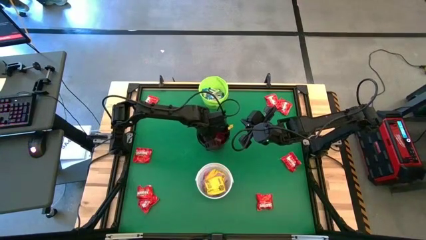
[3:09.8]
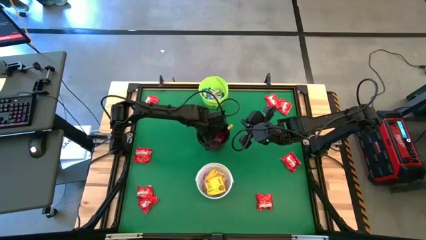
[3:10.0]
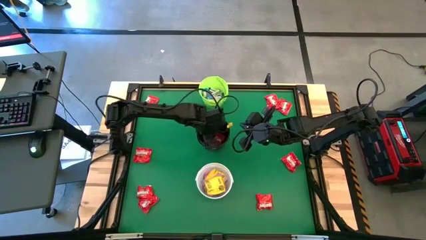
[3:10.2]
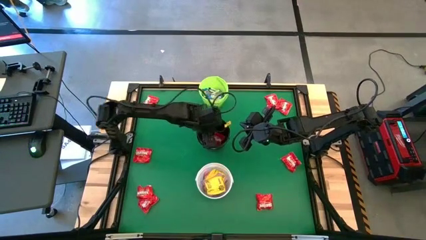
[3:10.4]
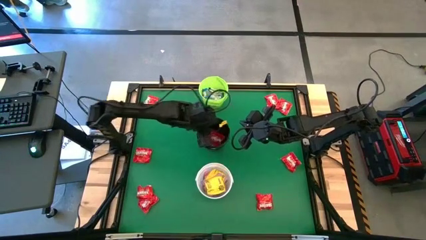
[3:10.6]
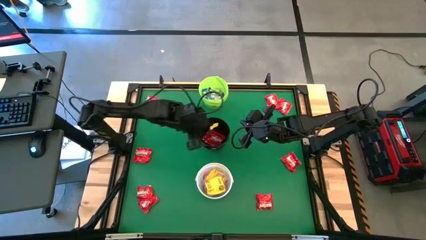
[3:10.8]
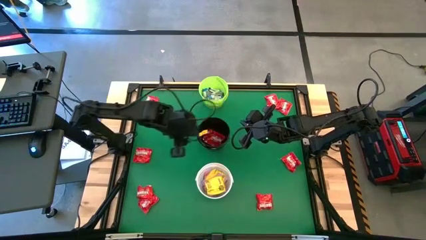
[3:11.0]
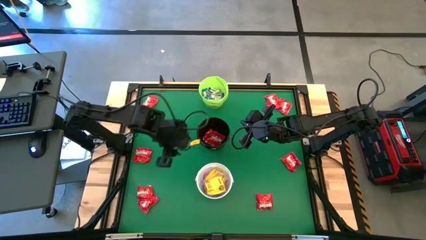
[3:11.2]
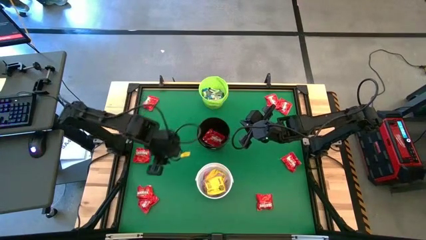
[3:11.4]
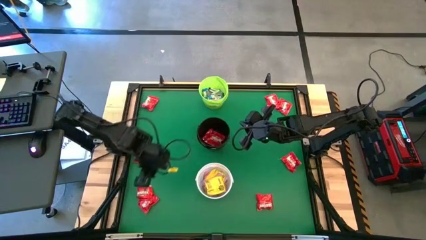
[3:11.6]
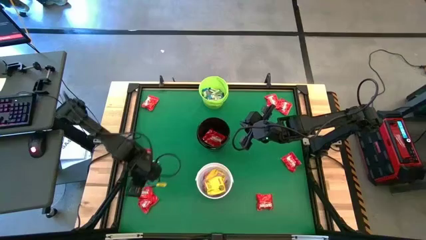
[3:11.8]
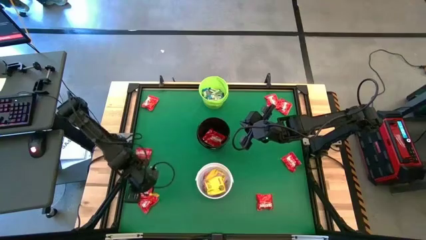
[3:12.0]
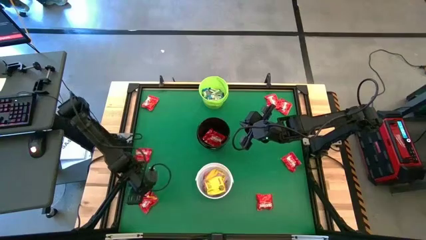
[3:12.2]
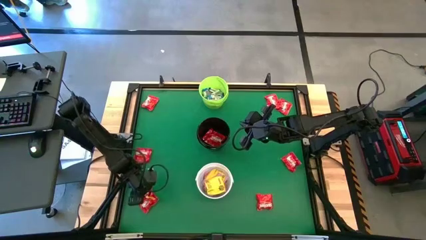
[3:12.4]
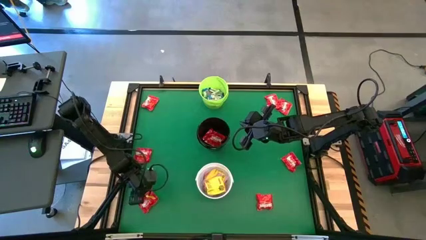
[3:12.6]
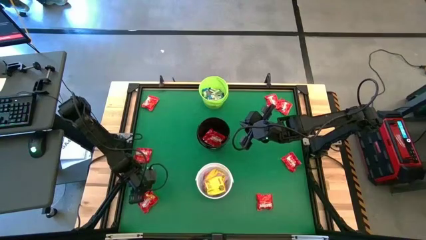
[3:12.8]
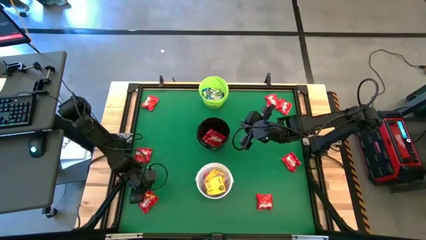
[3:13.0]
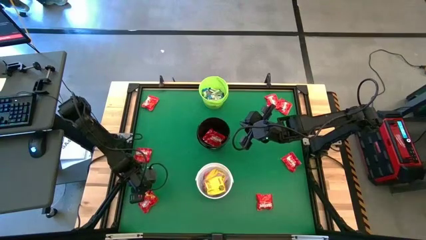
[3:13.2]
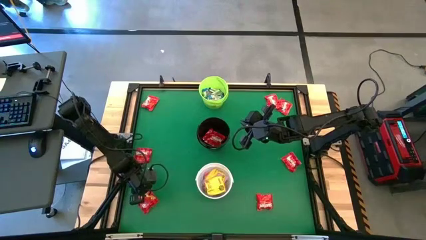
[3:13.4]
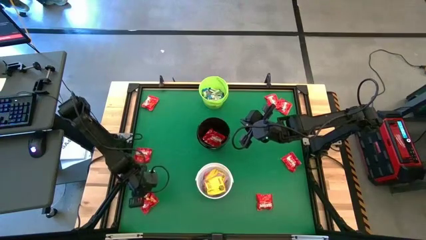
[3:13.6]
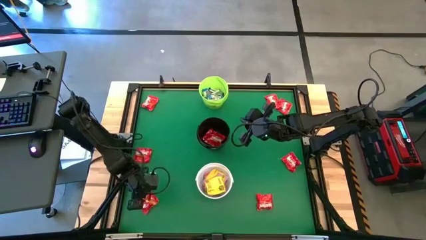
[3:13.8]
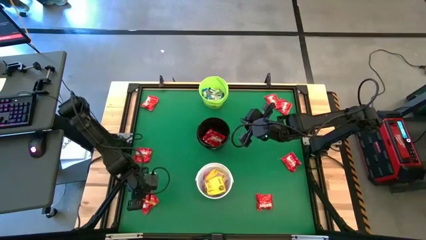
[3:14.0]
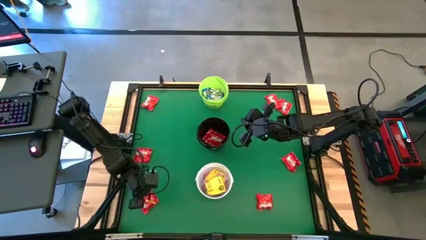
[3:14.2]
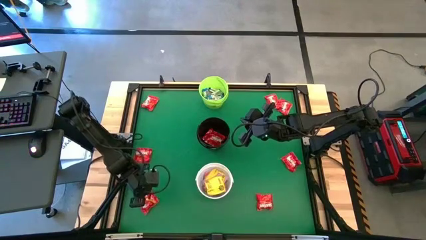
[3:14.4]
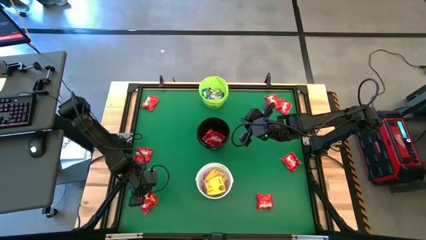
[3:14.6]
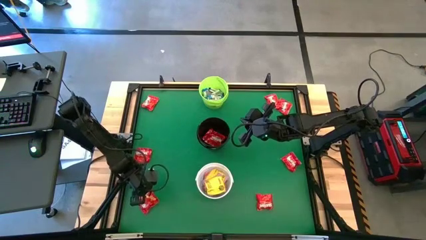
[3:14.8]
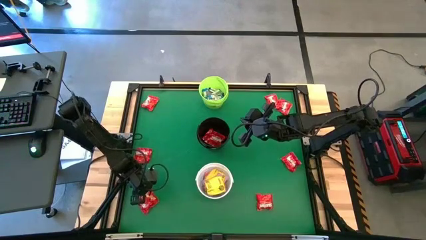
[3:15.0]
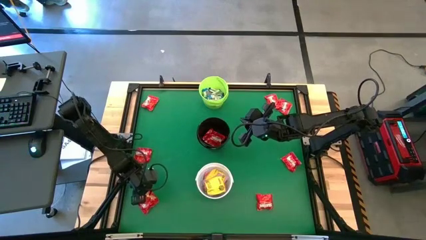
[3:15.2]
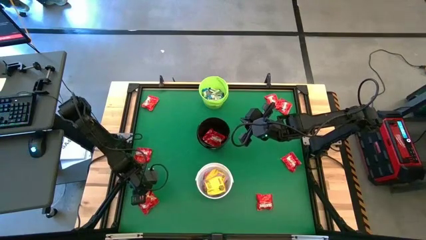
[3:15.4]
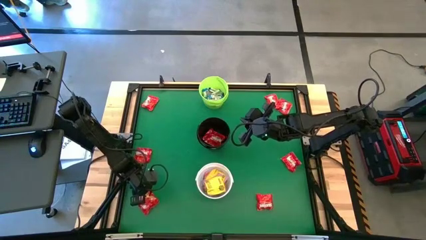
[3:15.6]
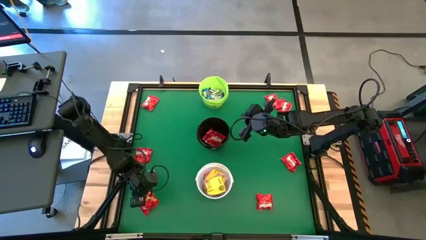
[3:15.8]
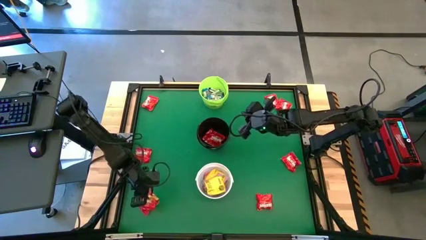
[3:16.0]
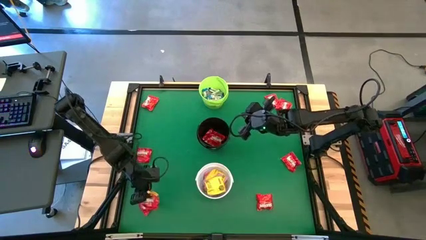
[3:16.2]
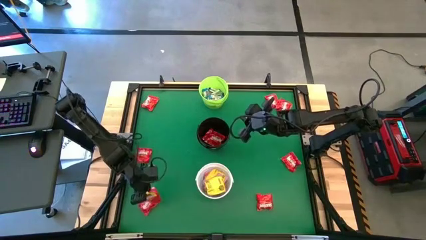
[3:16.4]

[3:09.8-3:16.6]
Task: Sort candy by brand, put in halloween buckets
Put the red chocolate into the black bucket

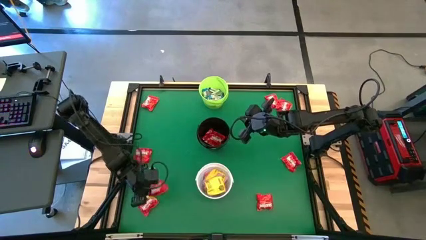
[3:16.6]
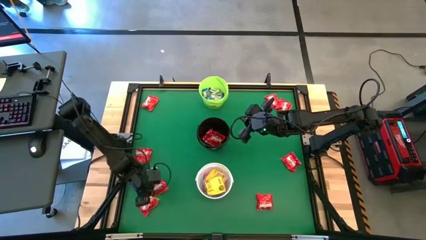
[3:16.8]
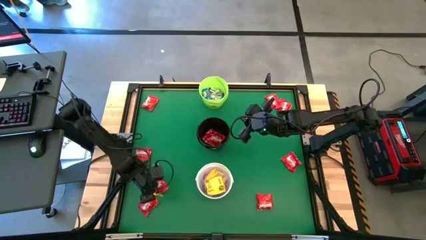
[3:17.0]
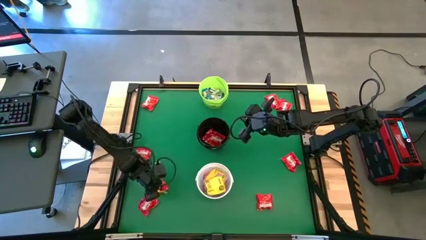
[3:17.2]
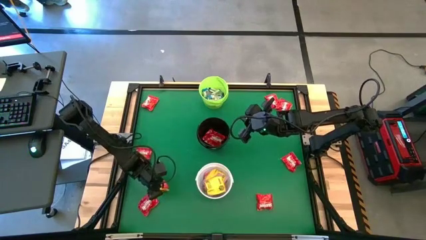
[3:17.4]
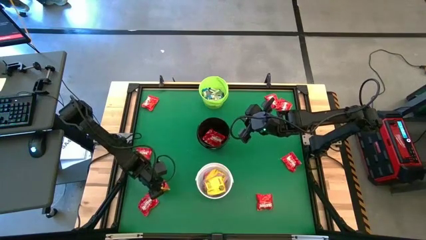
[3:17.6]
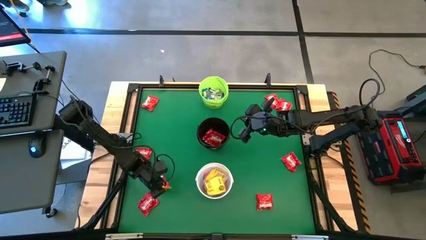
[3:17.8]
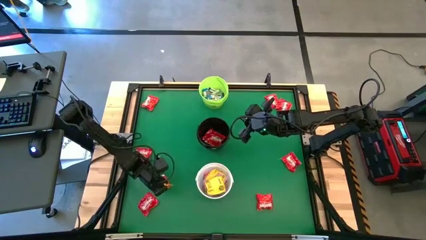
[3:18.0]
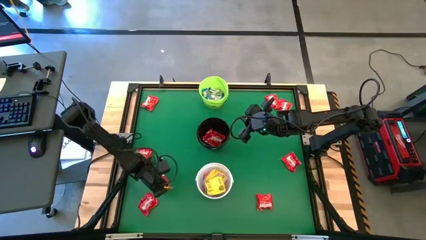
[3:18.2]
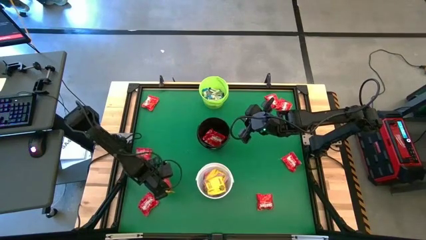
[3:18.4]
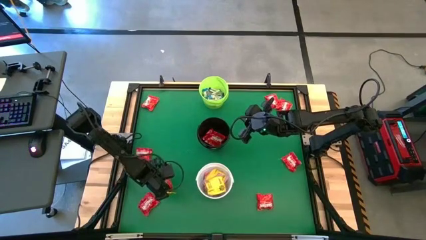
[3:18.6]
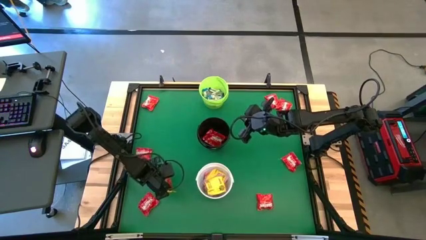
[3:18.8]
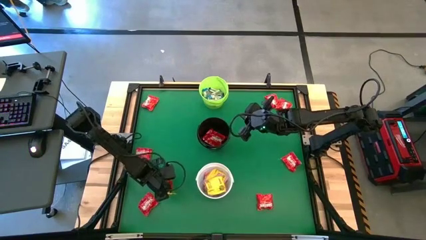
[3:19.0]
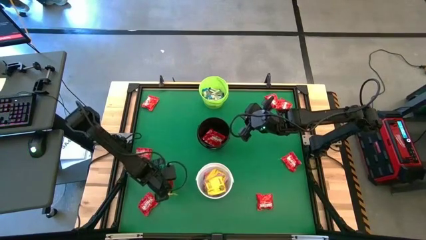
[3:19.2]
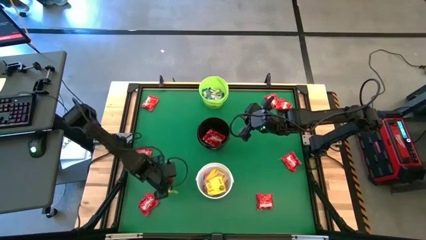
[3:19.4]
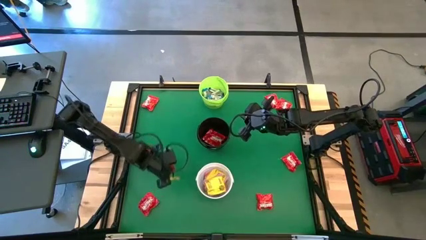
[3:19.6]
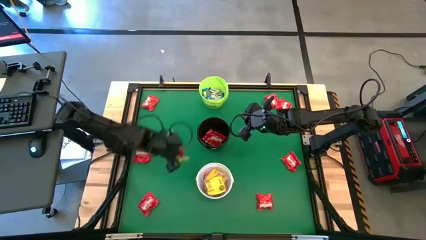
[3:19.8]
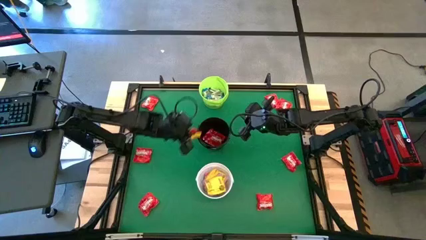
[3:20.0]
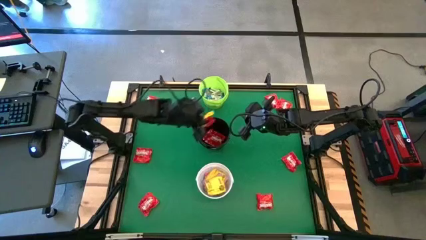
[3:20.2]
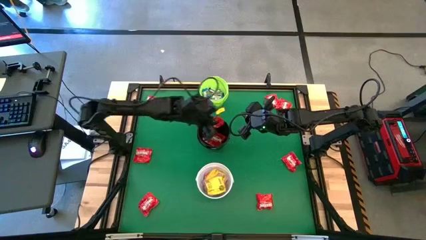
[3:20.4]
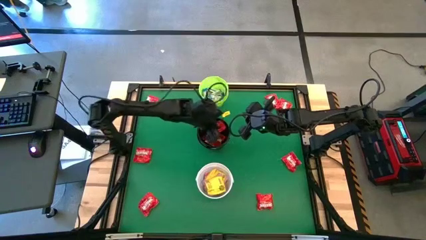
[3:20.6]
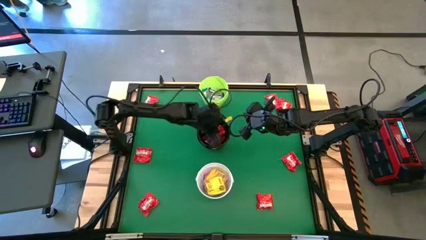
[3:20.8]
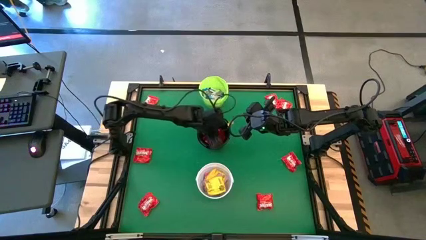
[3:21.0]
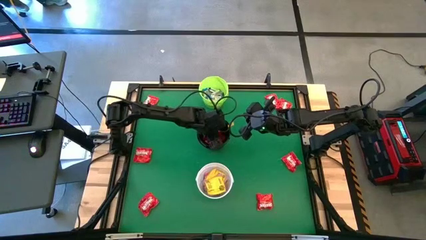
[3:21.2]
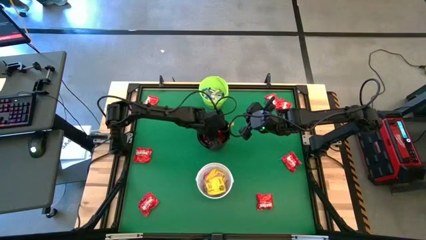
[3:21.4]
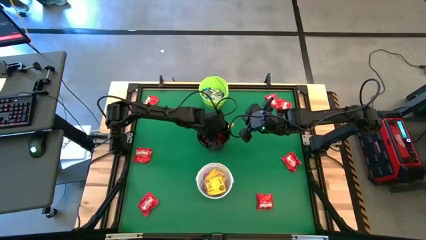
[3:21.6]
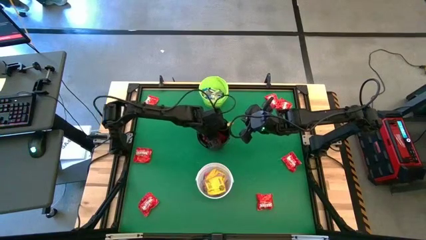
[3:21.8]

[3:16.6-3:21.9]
Put the red chocolate into the black bucket

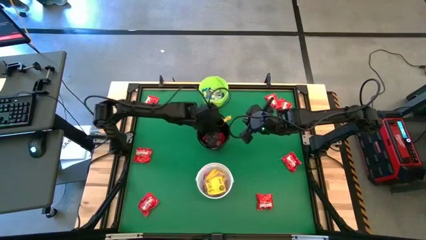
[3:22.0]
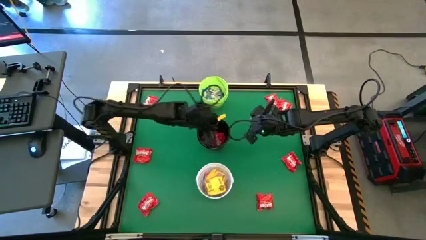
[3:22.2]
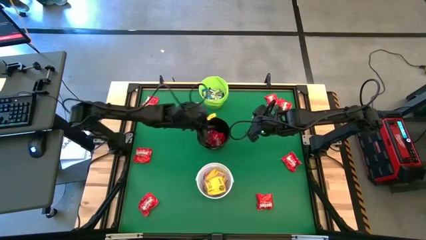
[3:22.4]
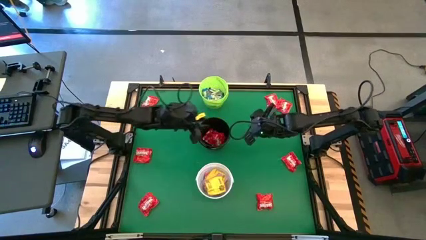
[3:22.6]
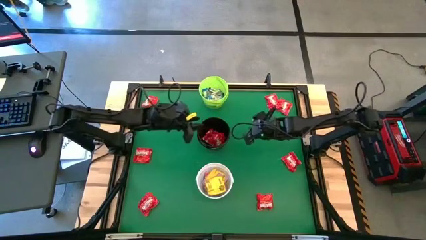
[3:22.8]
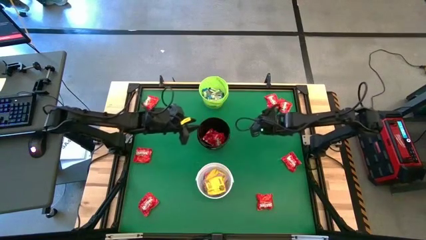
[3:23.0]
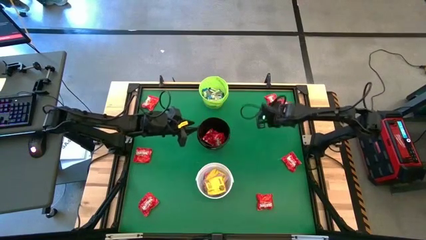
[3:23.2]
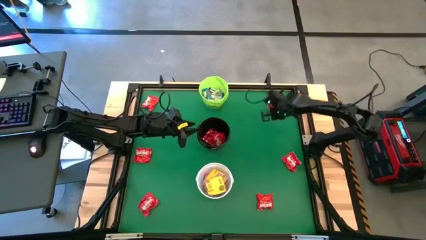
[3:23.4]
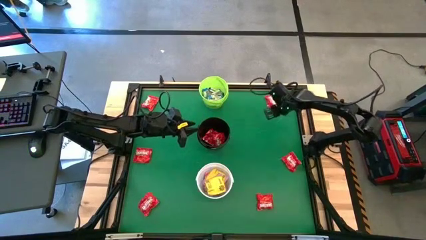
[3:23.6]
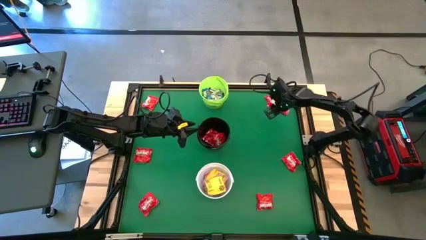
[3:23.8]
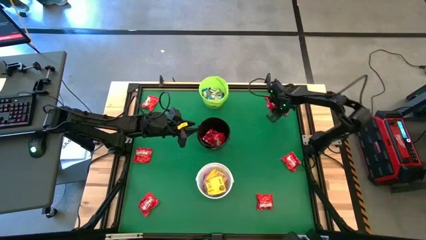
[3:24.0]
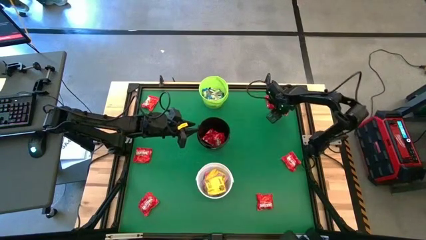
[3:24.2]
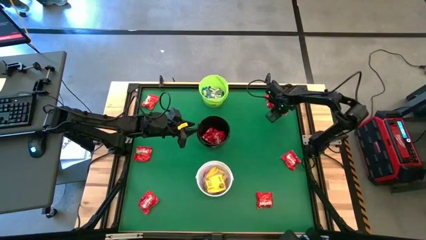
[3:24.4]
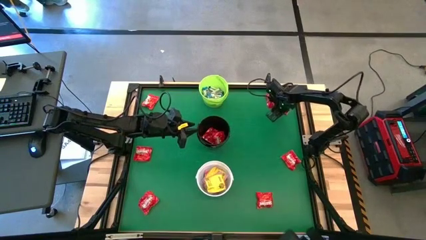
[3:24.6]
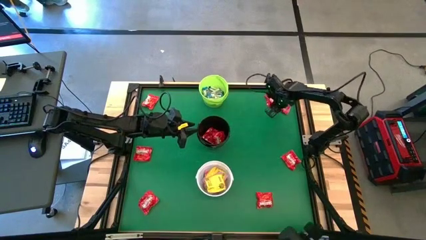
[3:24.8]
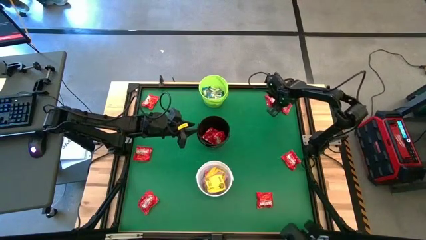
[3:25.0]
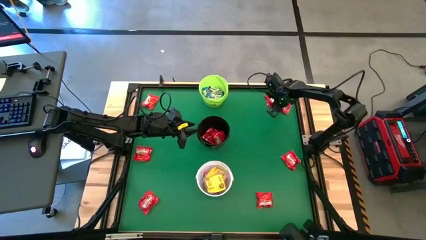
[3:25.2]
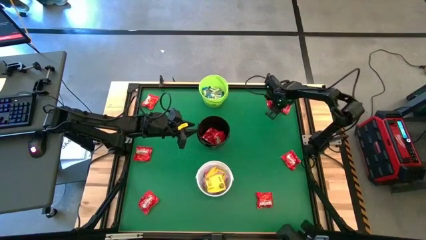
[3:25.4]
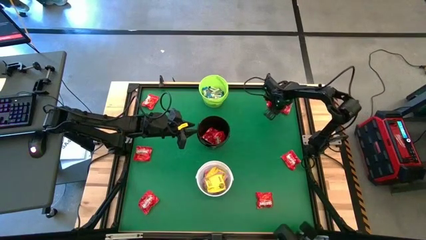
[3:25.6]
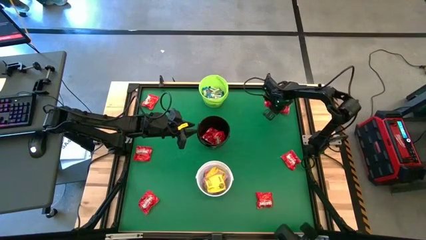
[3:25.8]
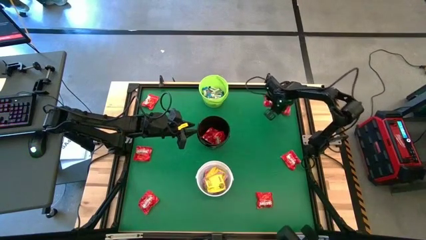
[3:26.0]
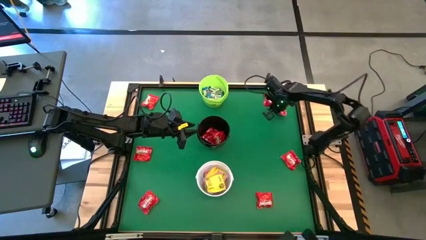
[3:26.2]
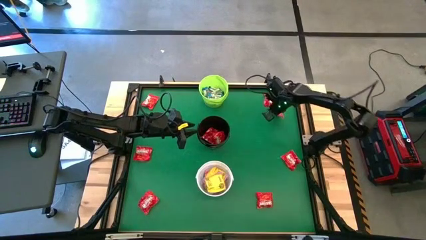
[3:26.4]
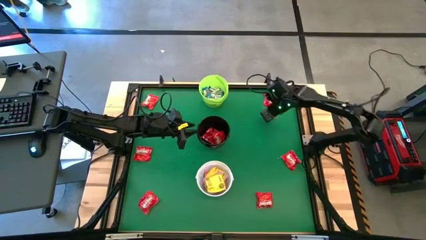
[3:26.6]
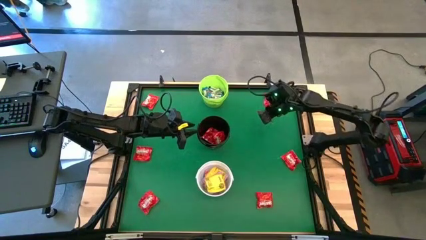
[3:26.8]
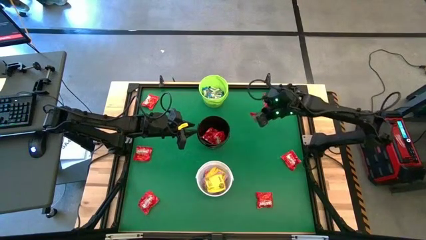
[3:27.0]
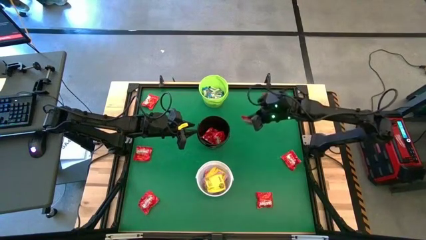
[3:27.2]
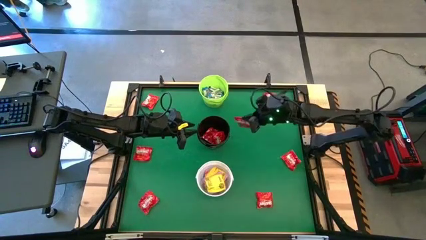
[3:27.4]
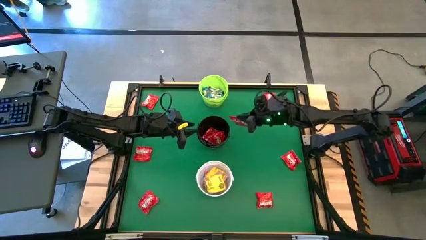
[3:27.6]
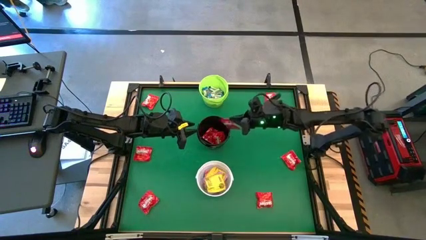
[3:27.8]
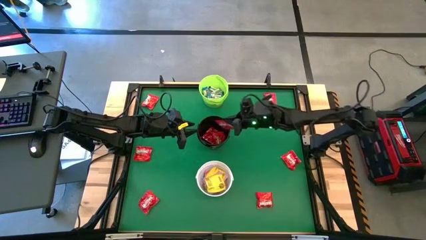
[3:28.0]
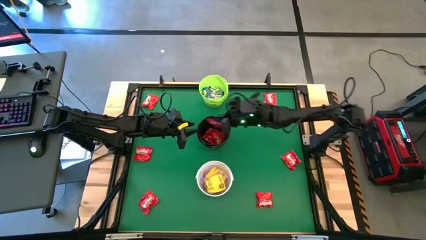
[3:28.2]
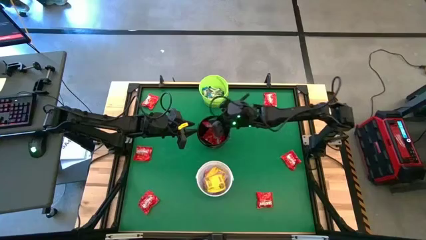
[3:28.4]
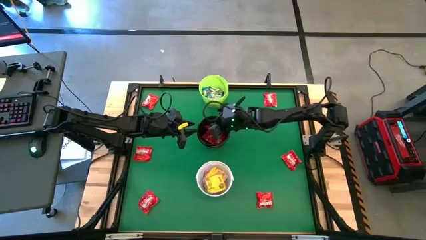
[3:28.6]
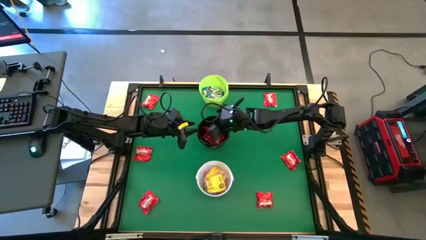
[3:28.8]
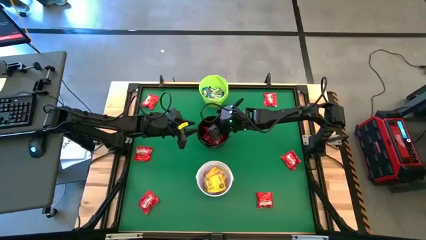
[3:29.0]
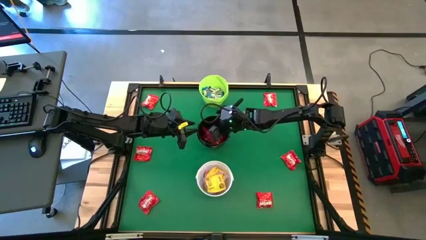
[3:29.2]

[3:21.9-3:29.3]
Put the red chocolate into the black bucket
